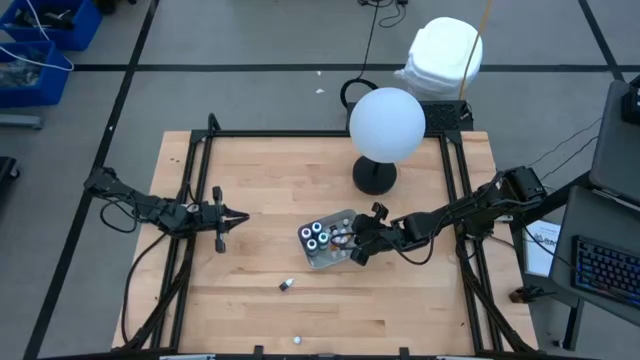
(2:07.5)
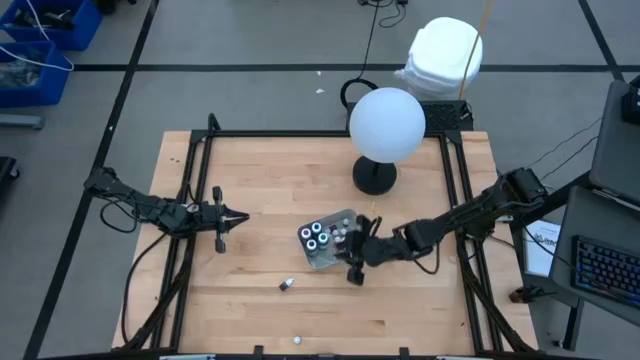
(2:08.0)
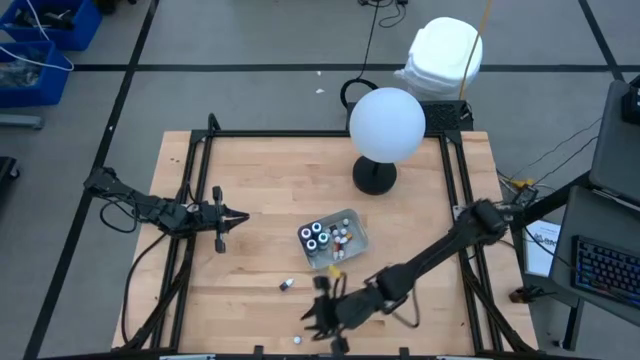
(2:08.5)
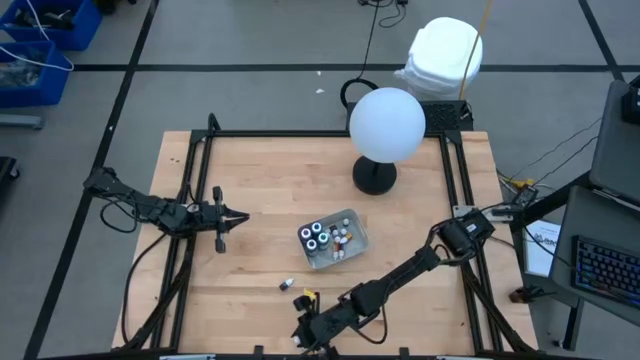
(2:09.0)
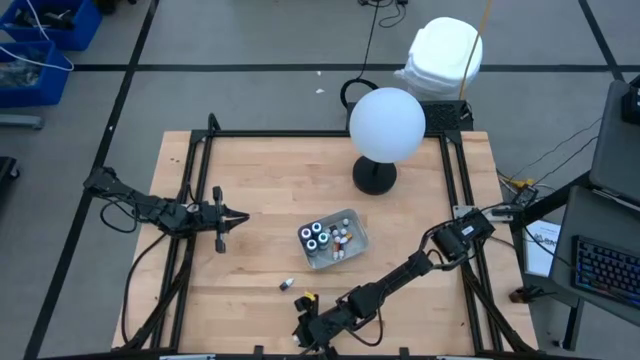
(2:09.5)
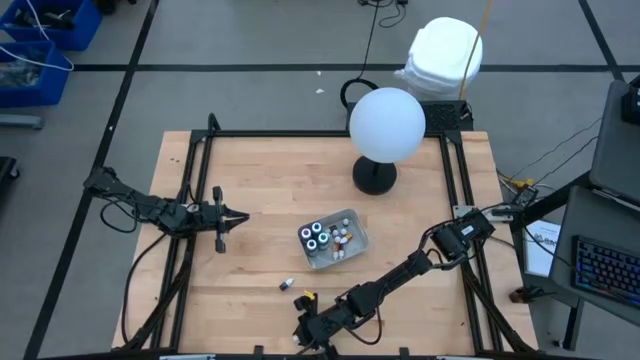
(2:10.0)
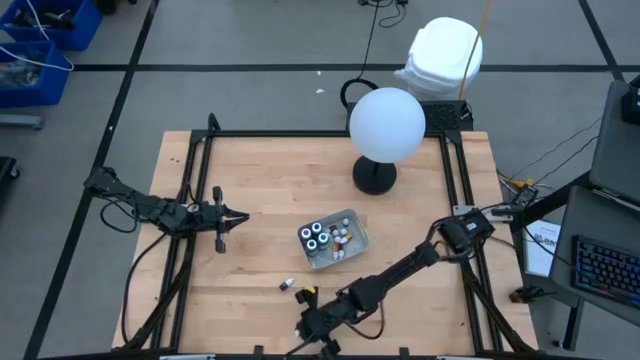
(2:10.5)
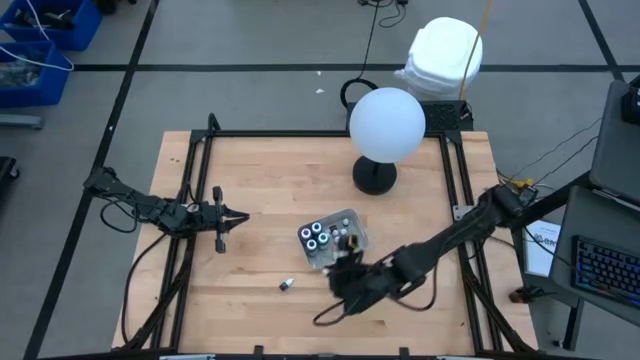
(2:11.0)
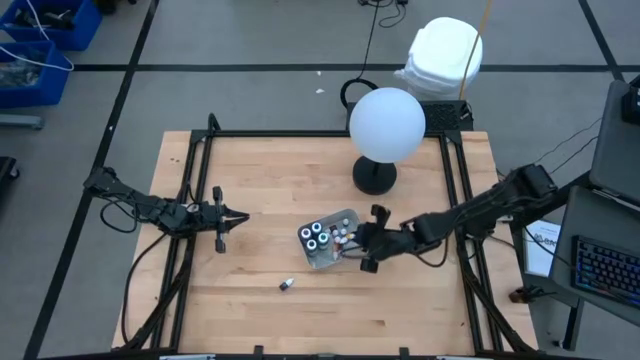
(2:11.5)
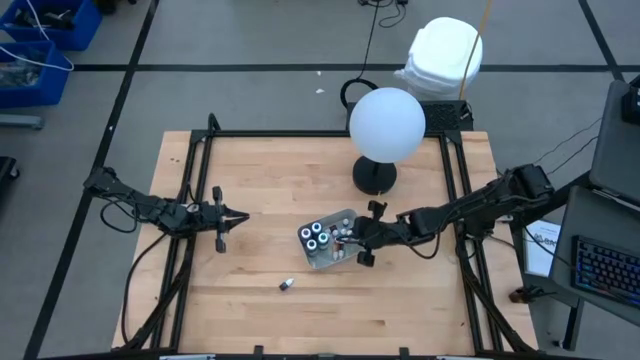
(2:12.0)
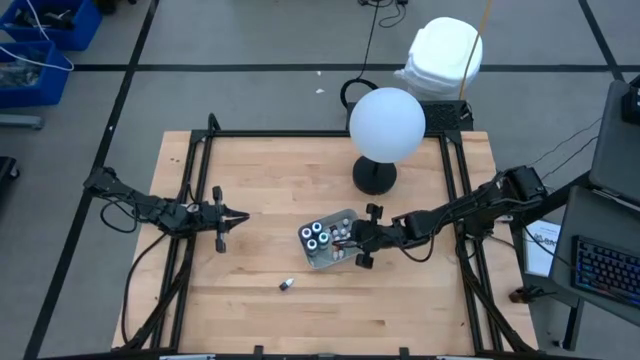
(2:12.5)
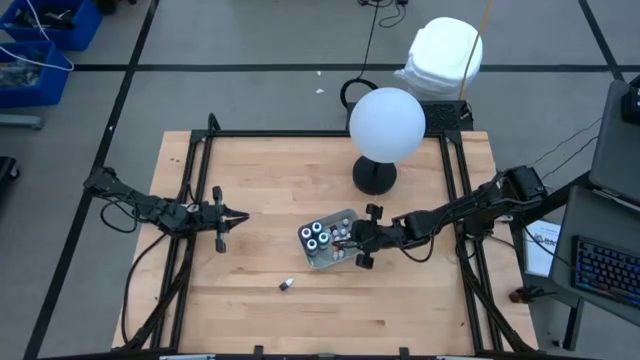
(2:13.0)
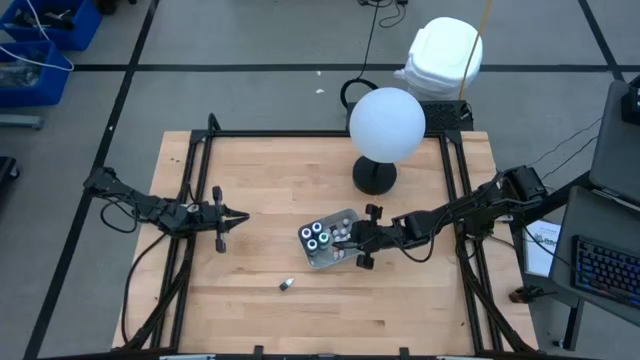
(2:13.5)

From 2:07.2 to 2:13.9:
Task: Pick & Place food coloring
Put the small blue food coloring bottle into the gray bin

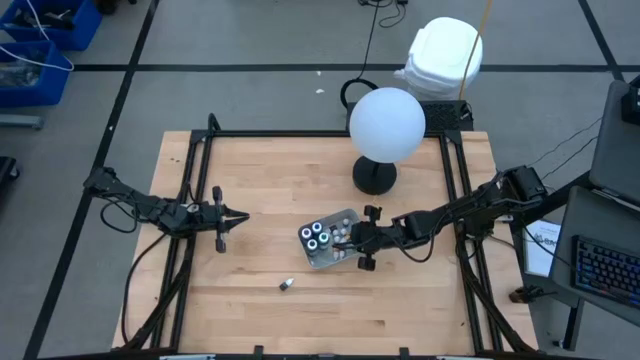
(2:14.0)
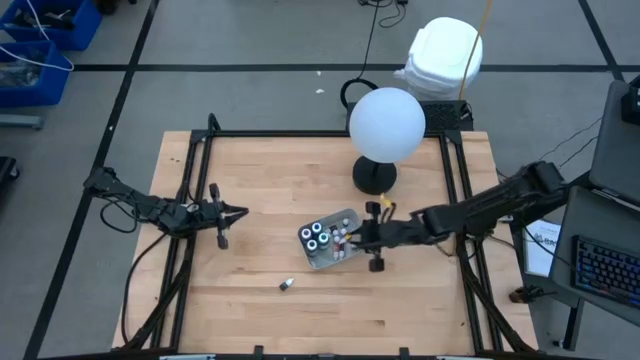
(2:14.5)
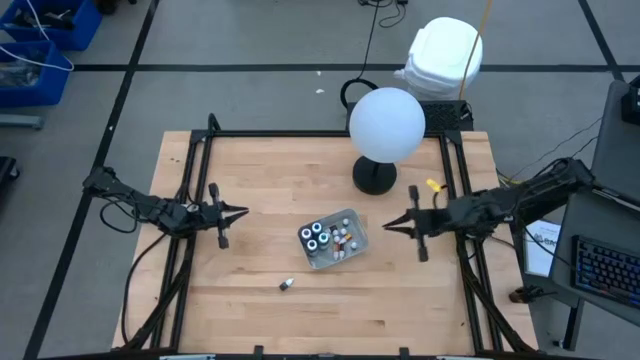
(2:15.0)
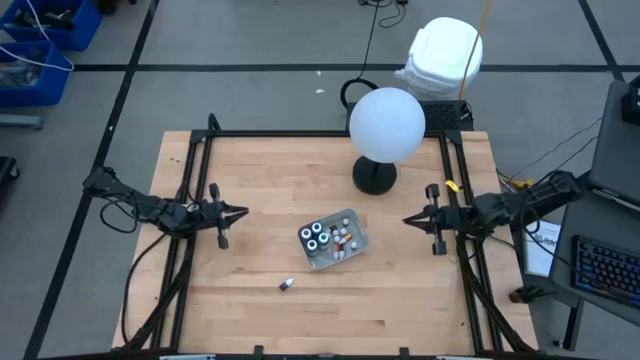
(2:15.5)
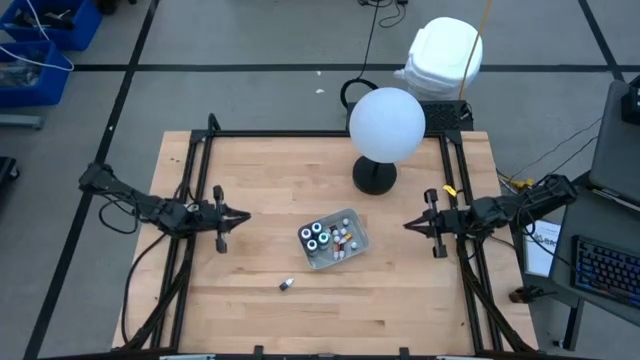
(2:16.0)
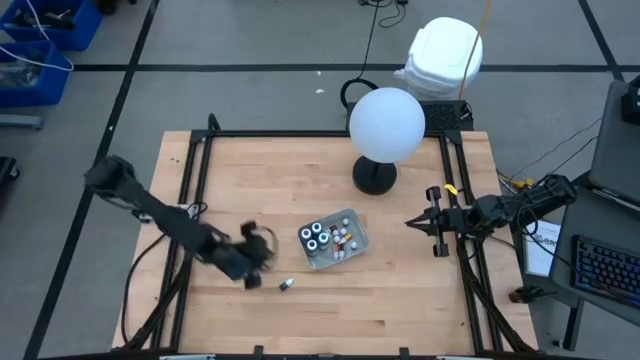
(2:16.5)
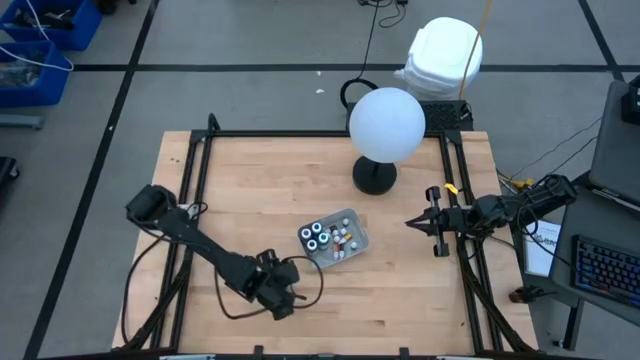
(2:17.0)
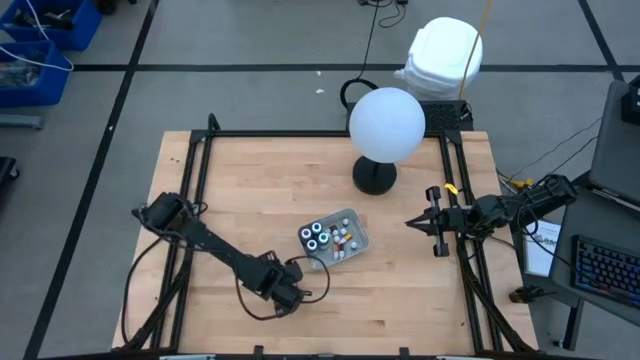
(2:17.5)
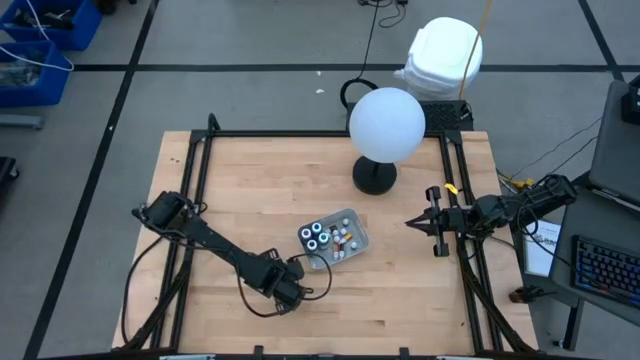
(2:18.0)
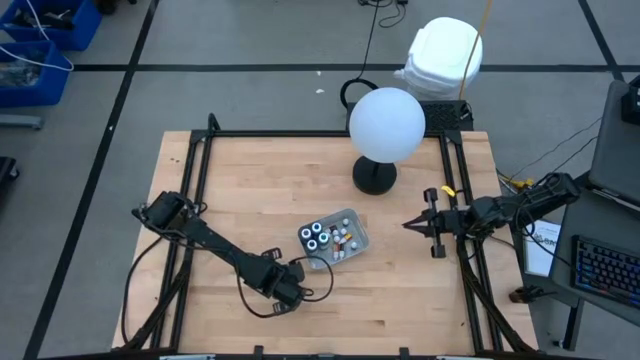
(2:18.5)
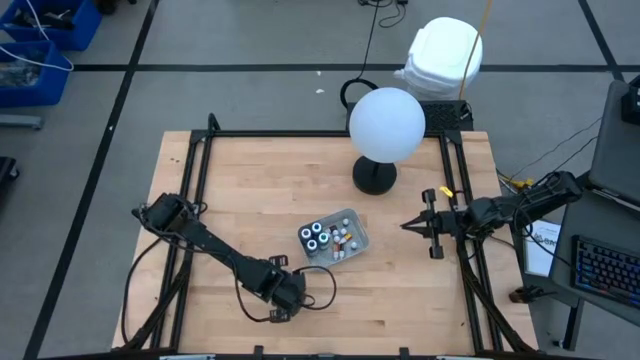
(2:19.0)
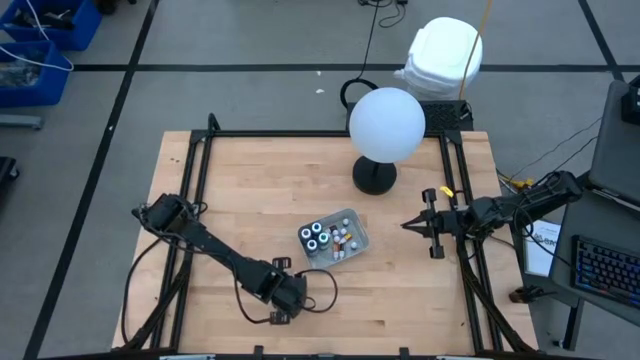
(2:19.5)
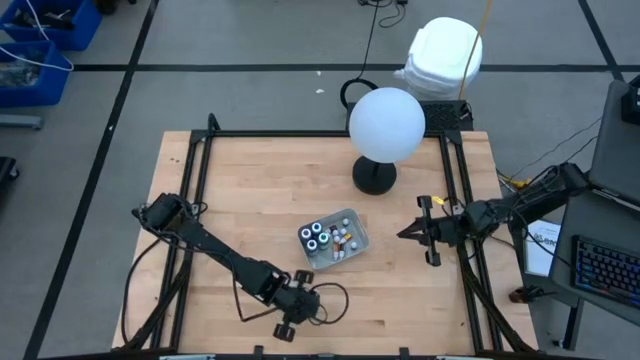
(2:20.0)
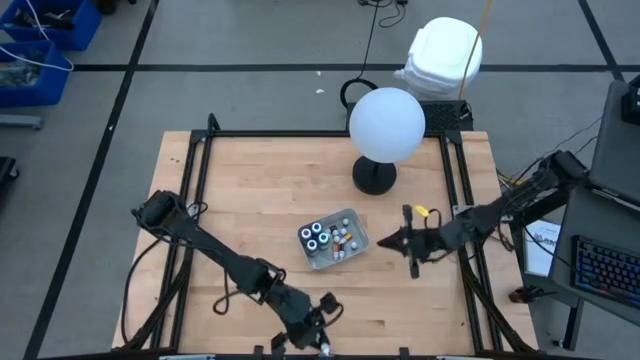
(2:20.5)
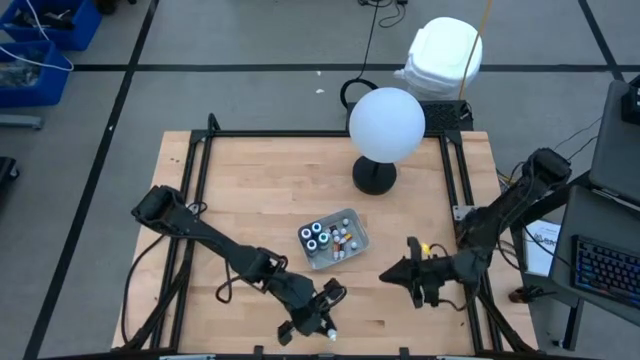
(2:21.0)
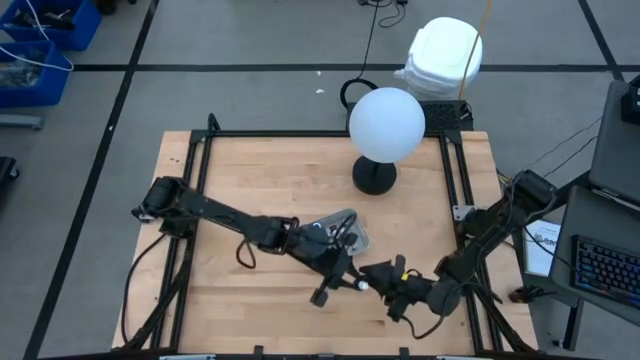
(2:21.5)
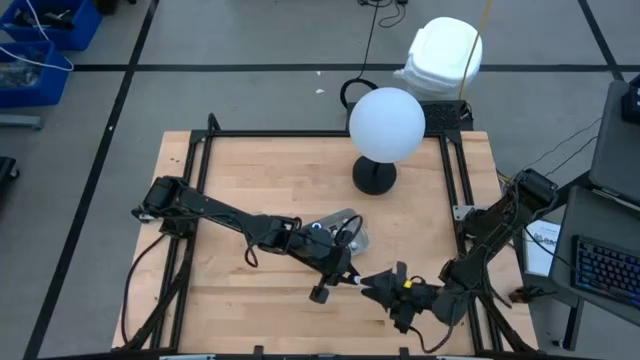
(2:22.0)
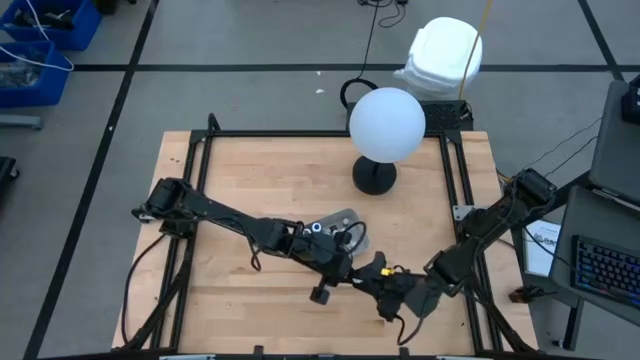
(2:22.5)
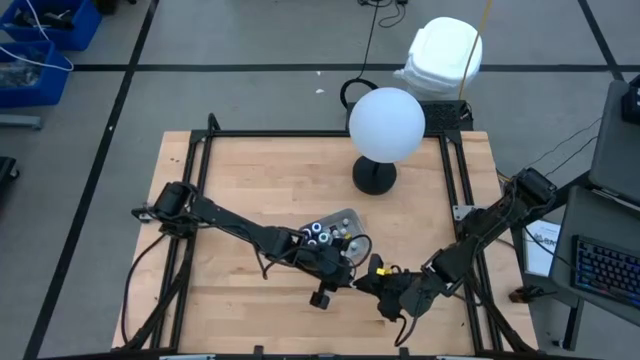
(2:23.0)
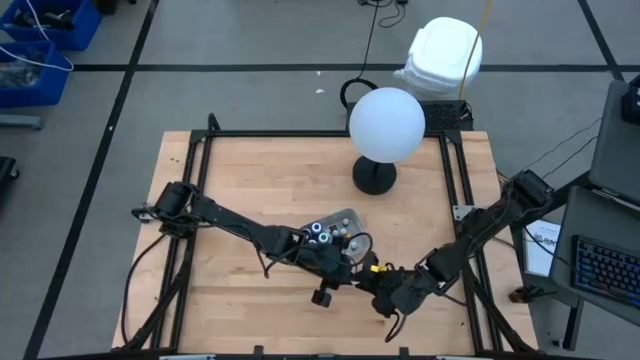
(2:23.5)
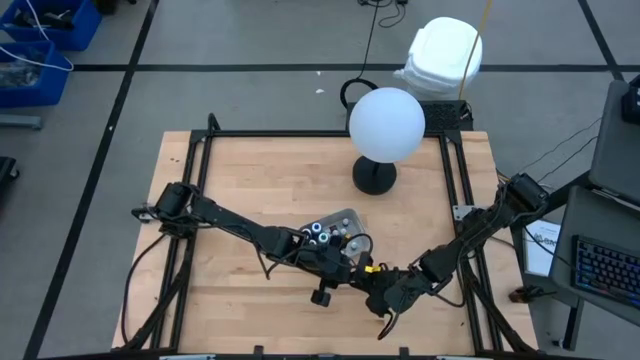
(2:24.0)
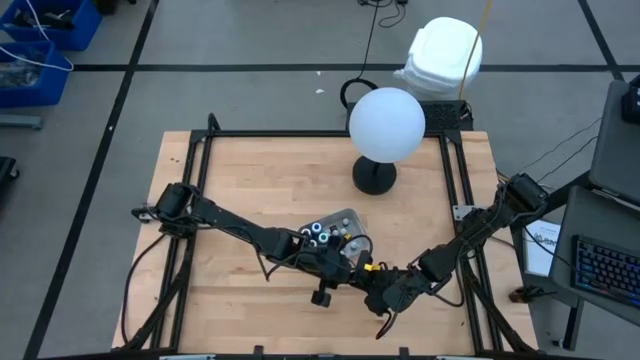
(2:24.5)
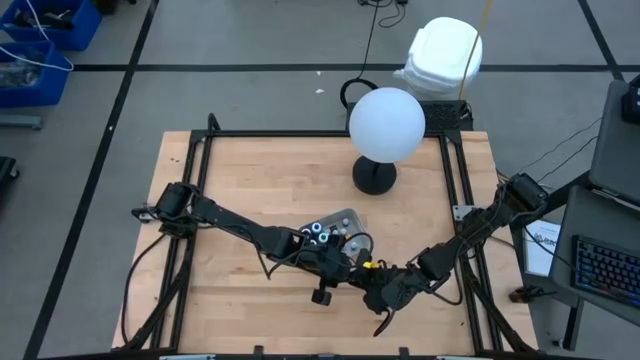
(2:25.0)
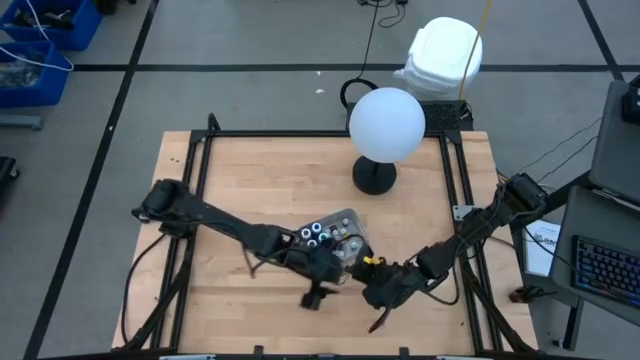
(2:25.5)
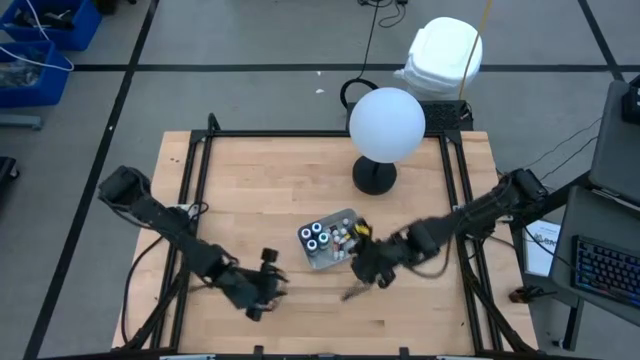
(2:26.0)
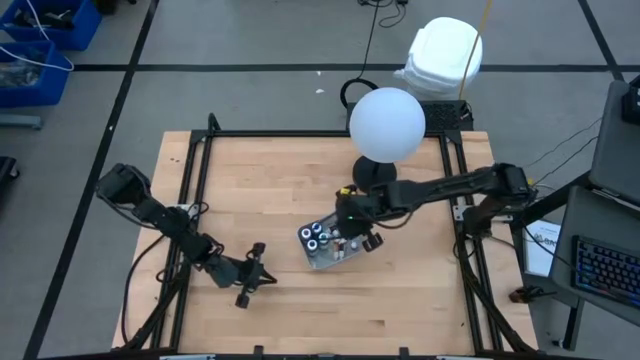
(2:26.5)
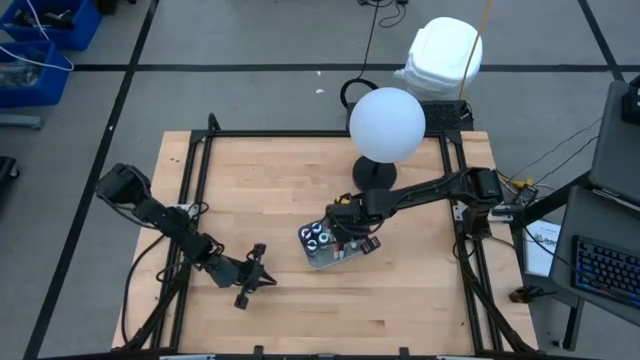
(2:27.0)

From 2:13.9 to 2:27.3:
Put the small violet food coloring bottle into the gray bin

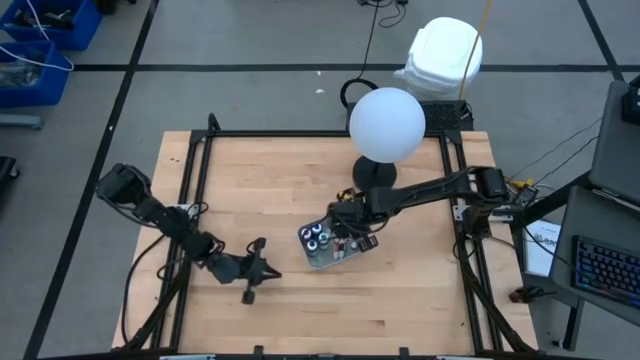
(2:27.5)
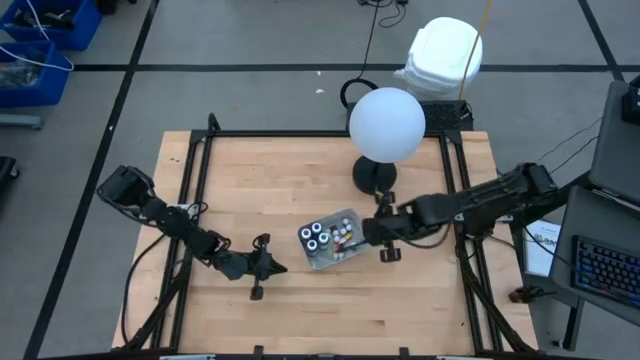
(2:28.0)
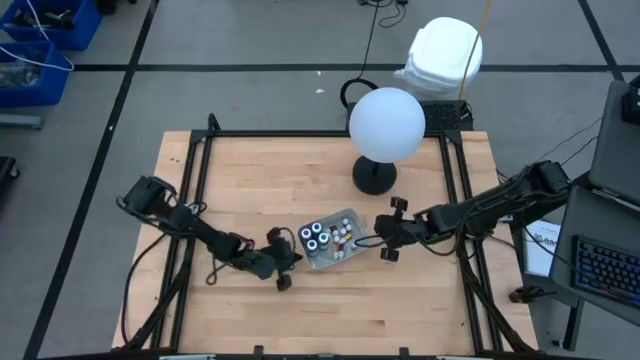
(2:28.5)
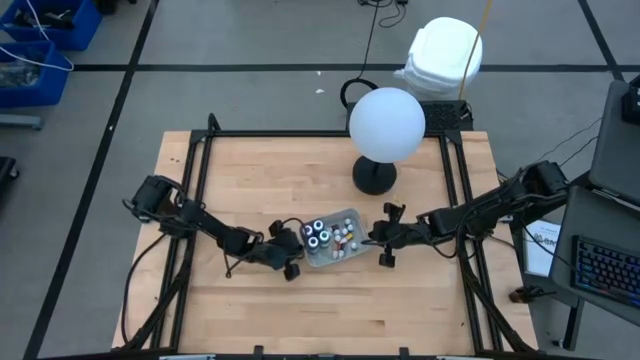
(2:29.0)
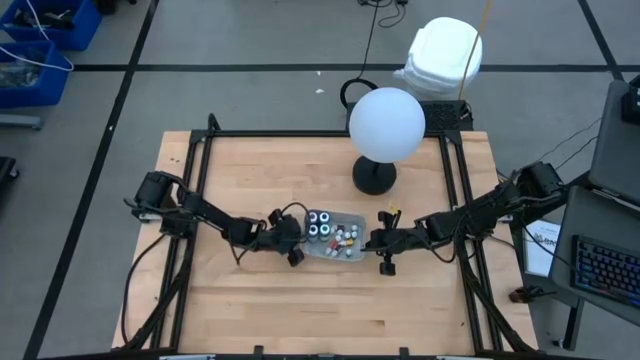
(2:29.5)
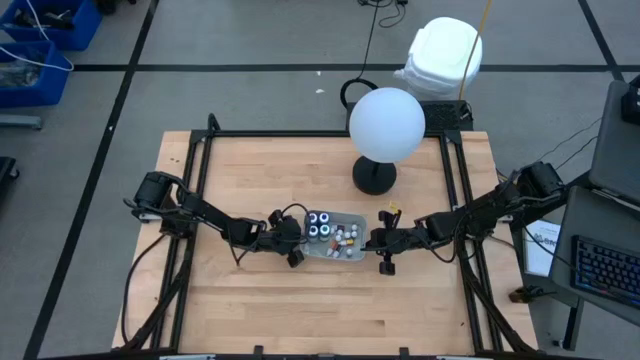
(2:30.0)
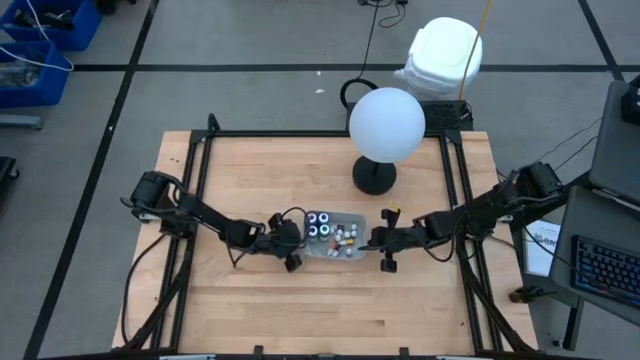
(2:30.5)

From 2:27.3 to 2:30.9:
Adjust the gray bin
